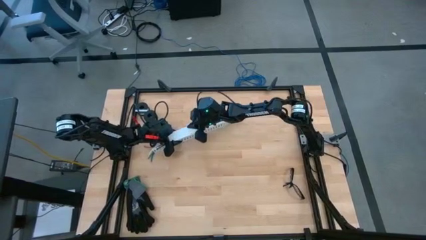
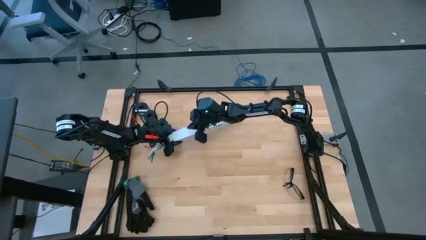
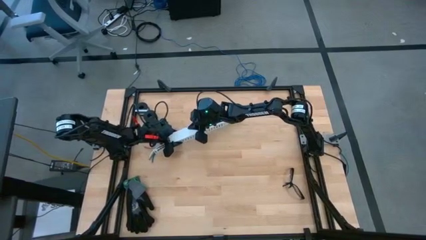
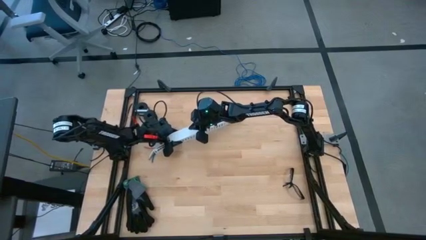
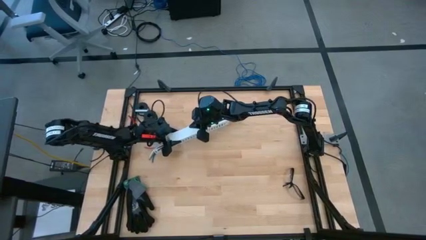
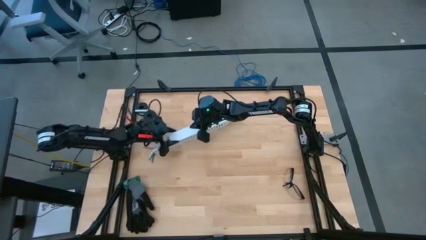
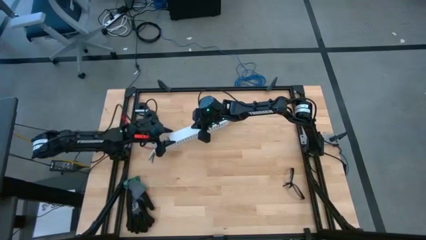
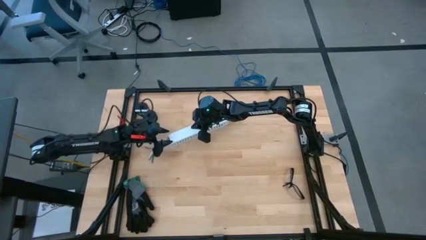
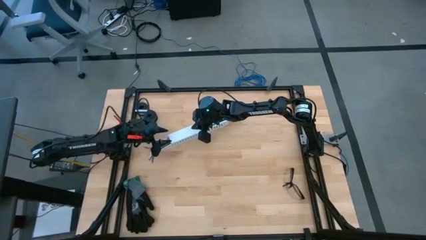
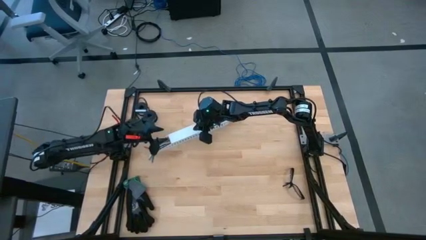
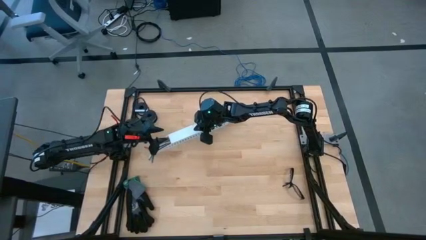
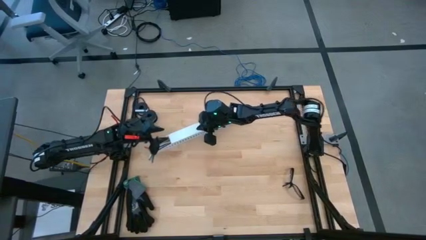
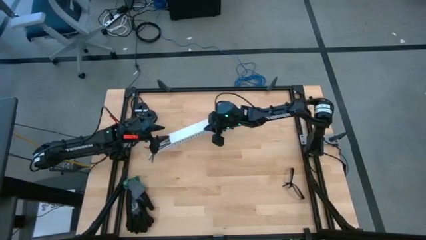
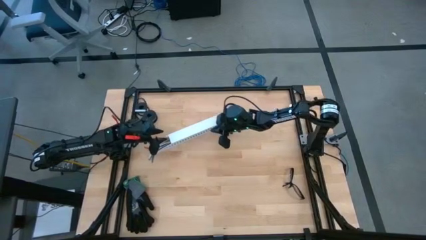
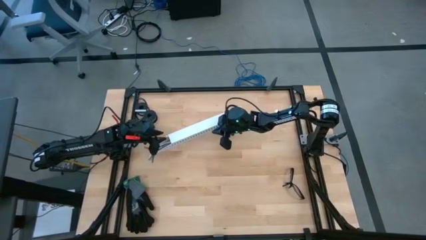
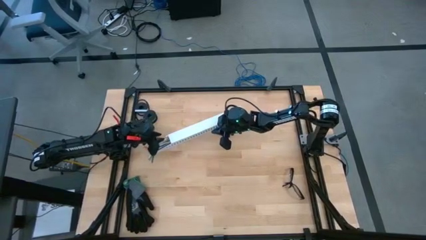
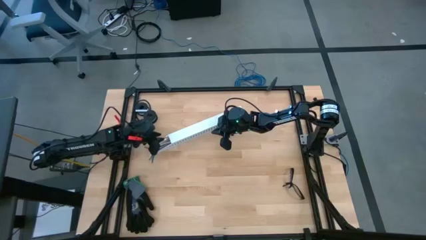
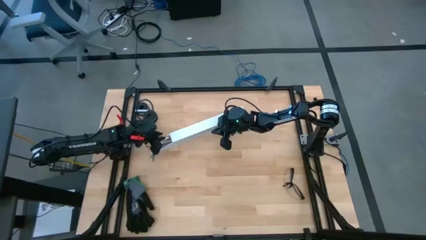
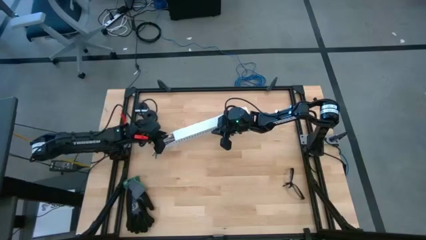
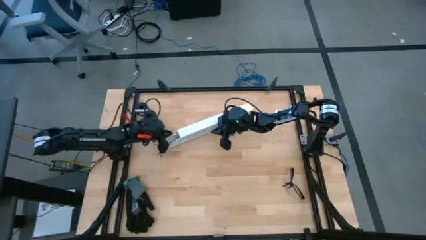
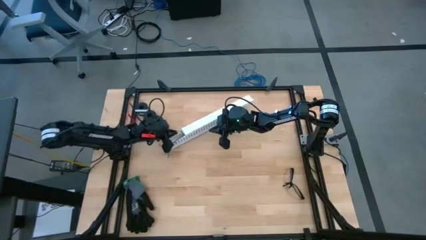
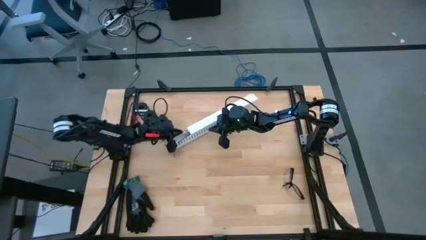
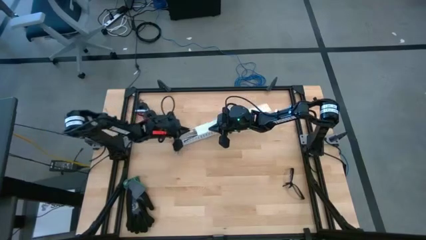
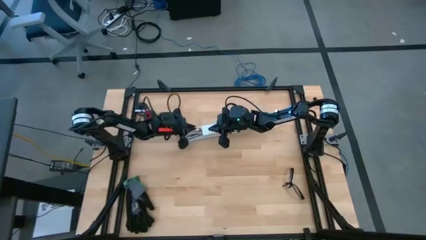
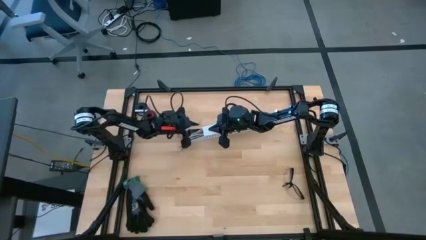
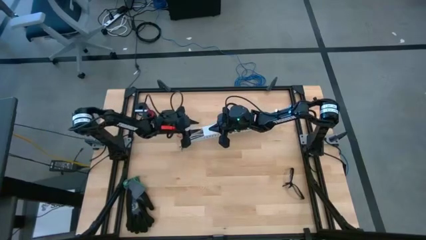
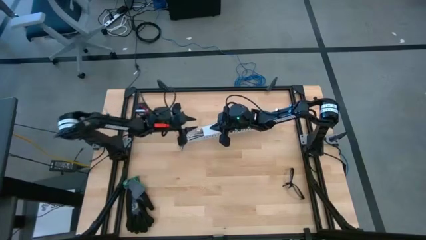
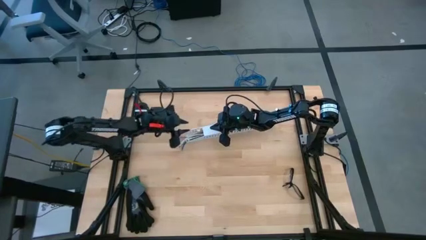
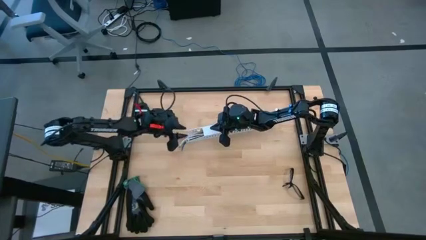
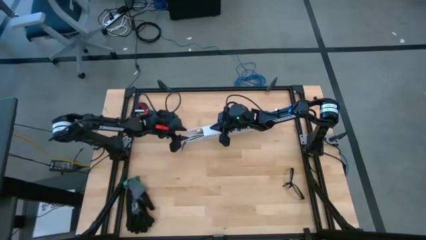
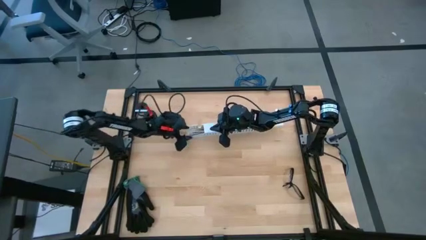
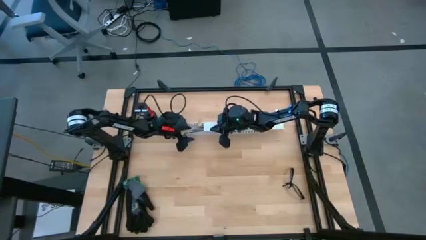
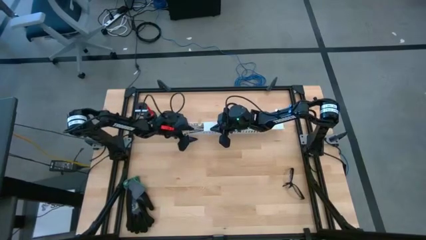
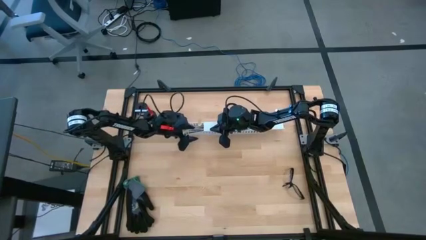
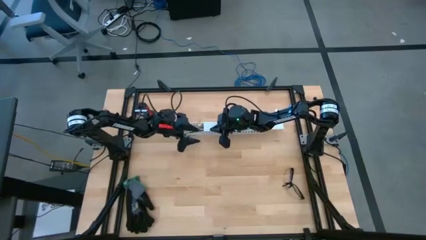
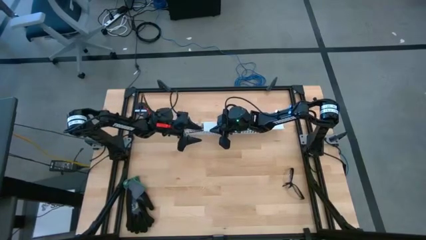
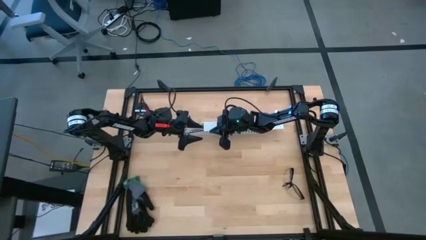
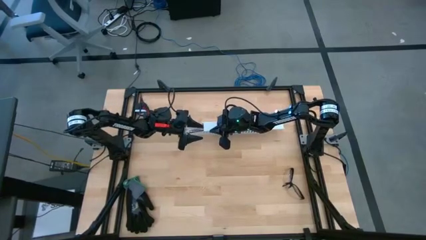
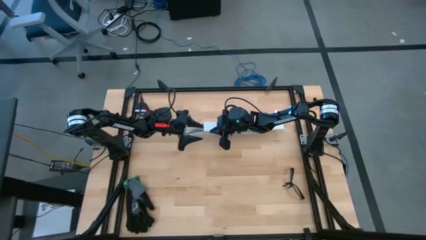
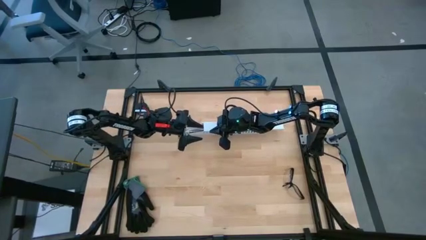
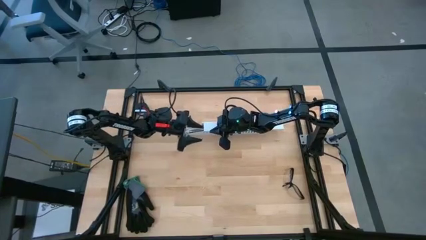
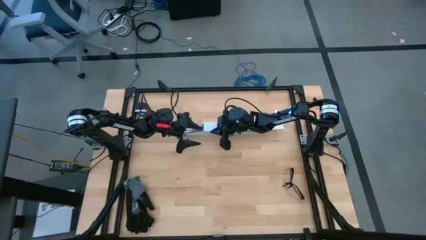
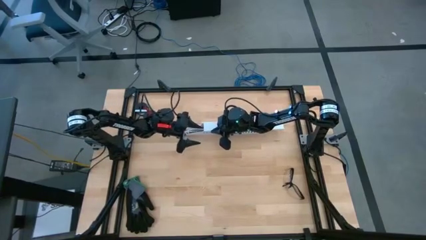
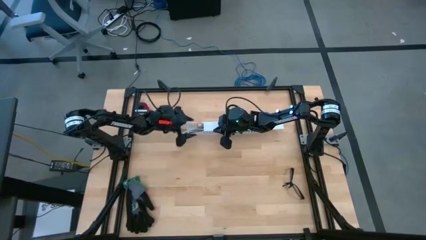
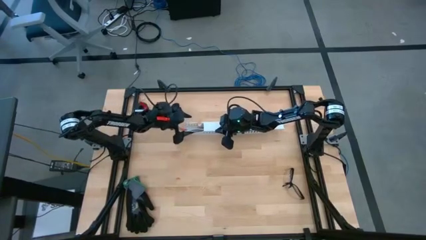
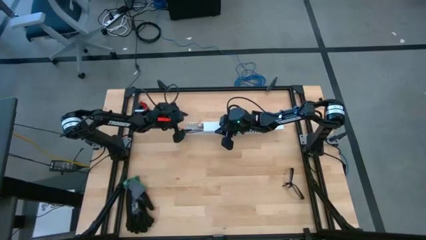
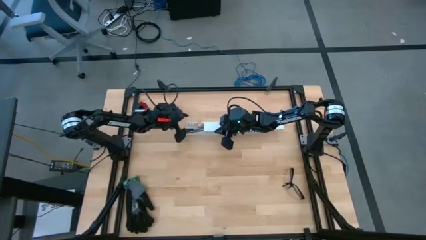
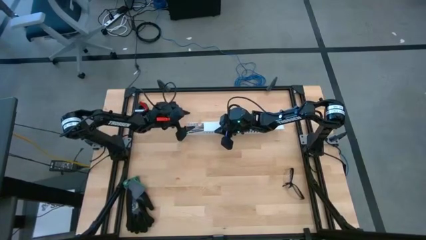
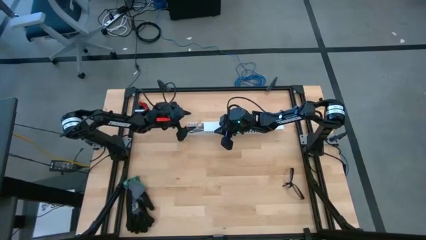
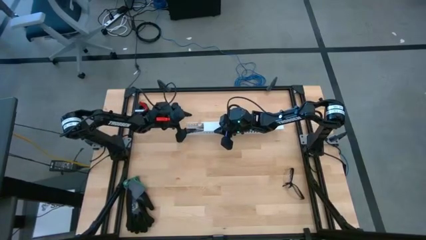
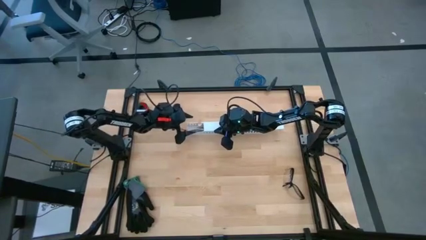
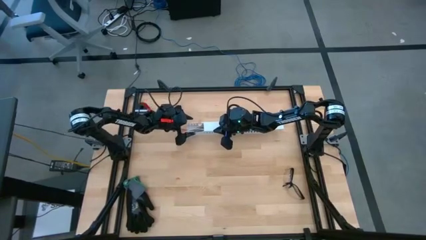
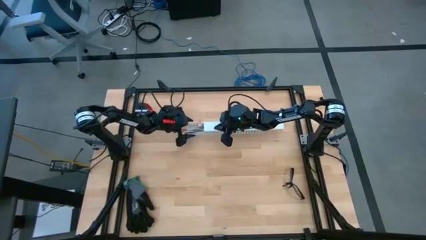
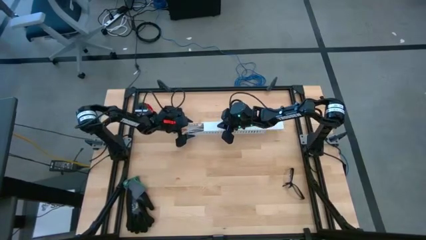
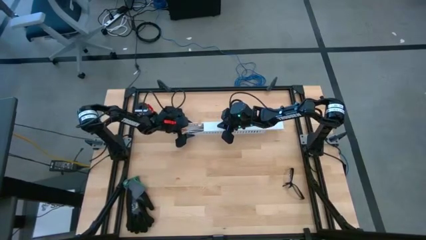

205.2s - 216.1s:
Task: Ziptie cables
Close the white cable duct

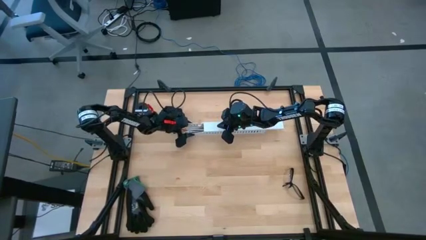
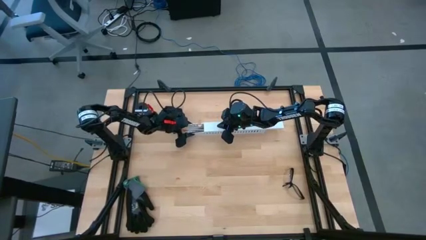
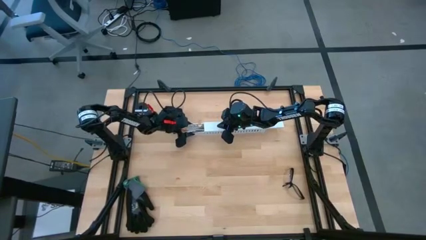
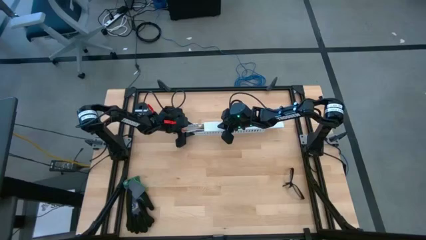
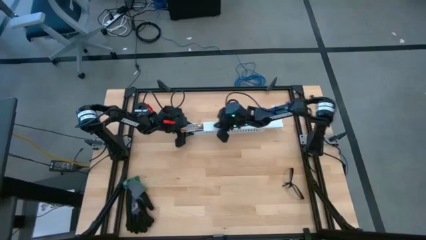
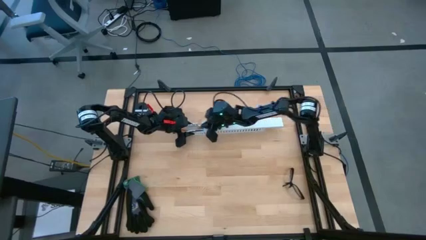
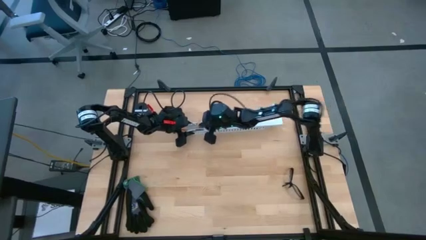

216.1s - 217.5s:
Close the white cable duct

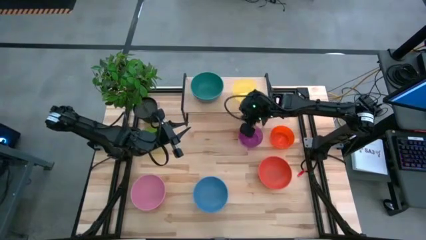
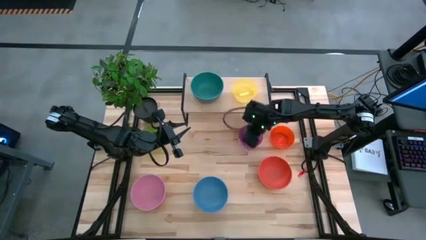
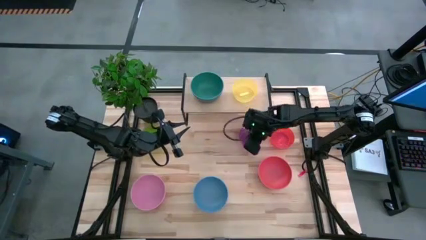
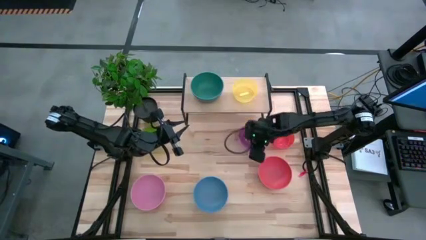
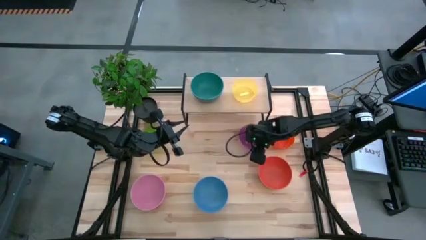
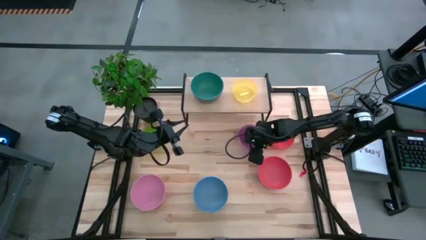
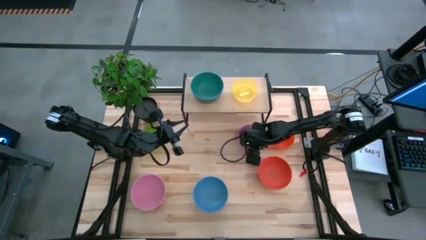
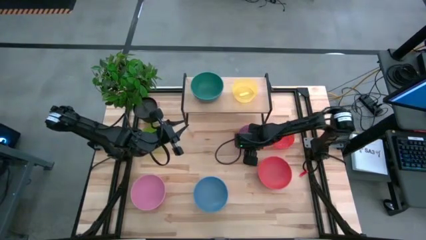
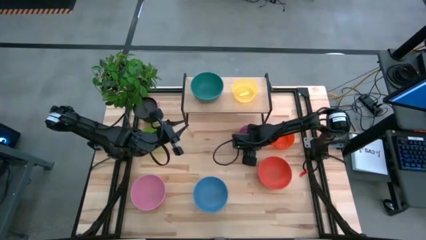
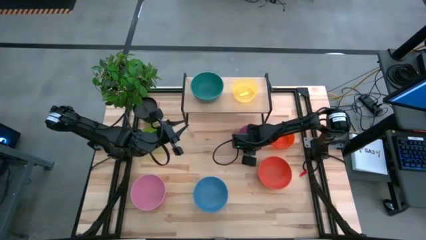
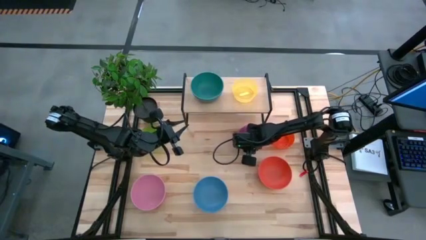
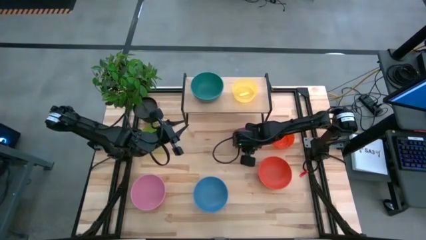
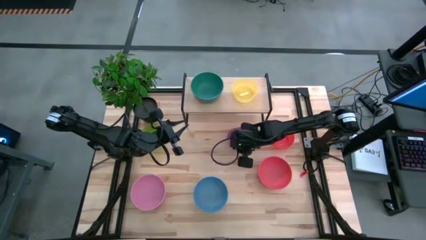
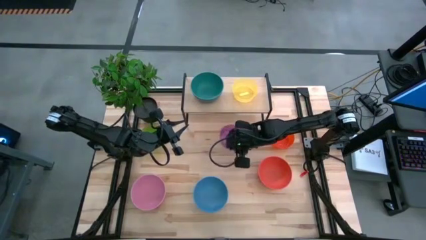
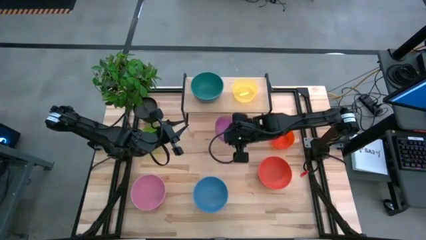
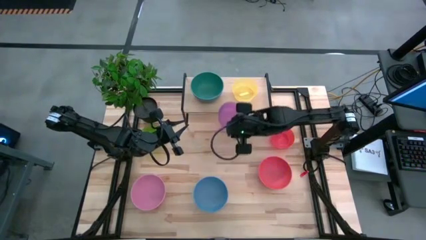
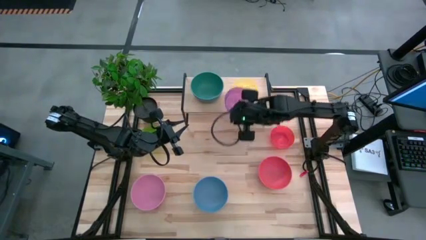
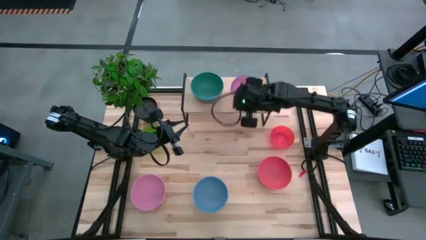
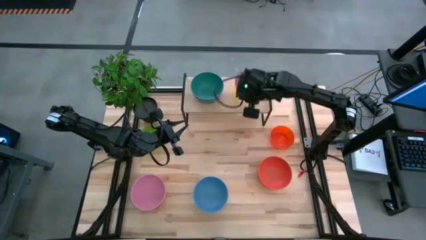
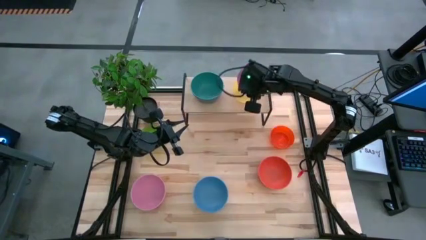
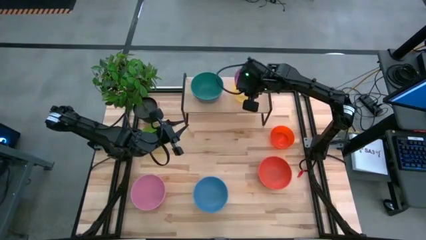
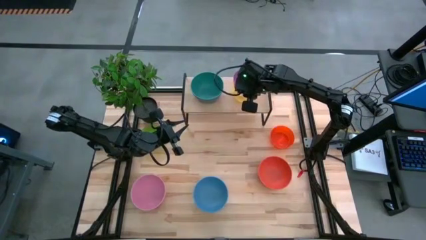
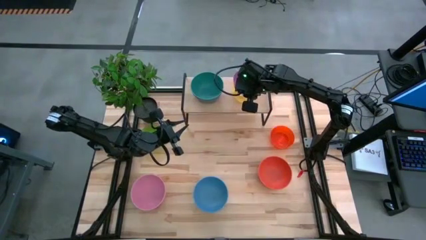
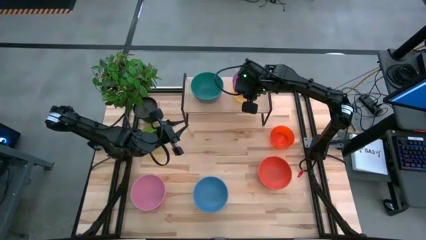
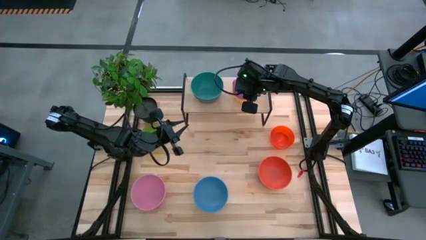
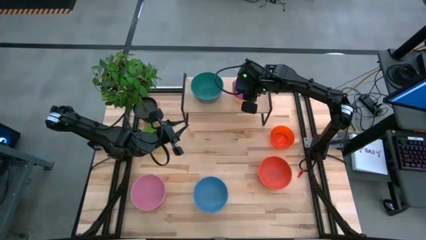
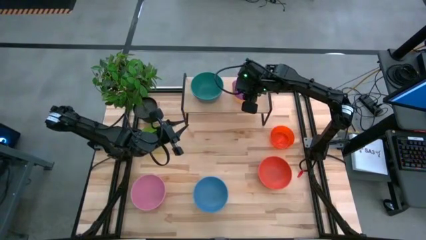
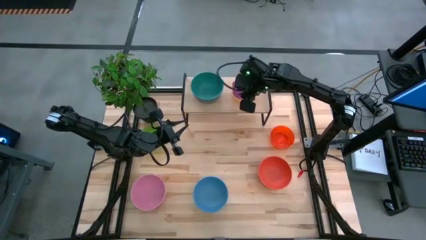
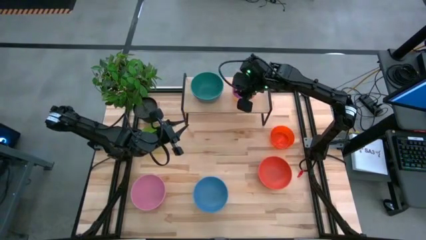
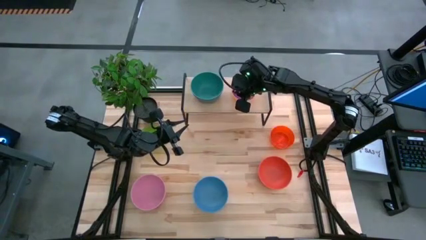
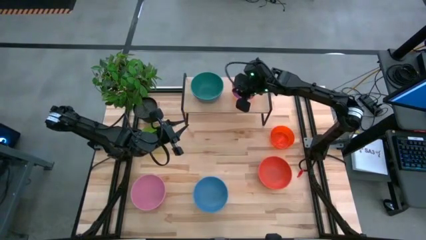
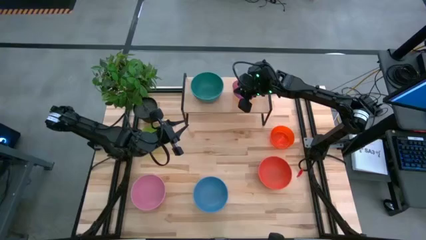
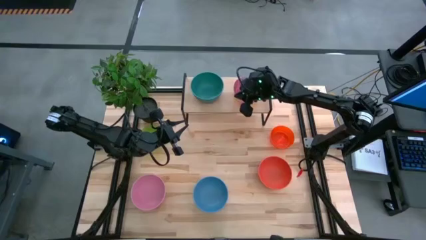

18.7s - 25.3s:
Task: Place and stack bowls onto a shelf
Stack the small purple bowl on top of the small yellow bowl on the shelf
